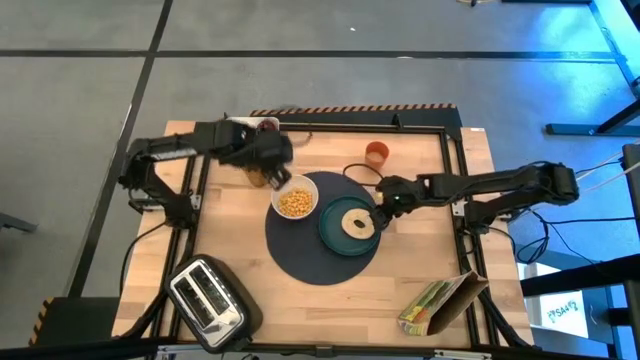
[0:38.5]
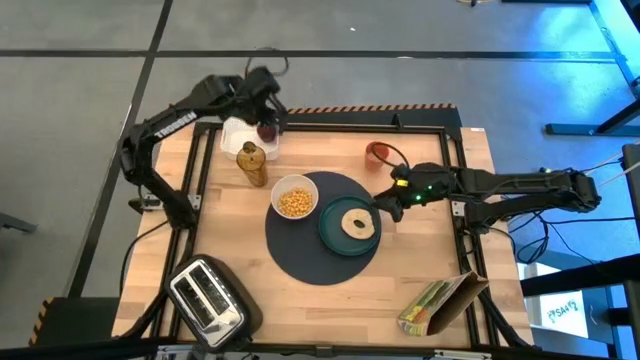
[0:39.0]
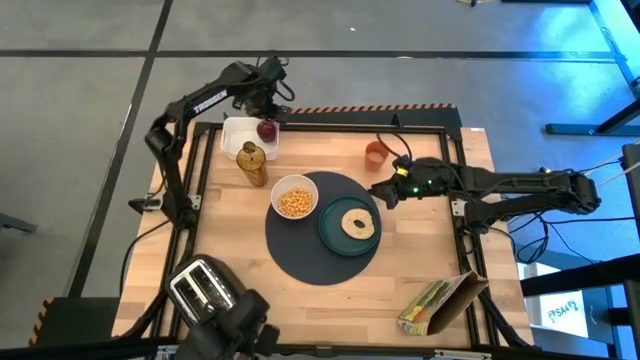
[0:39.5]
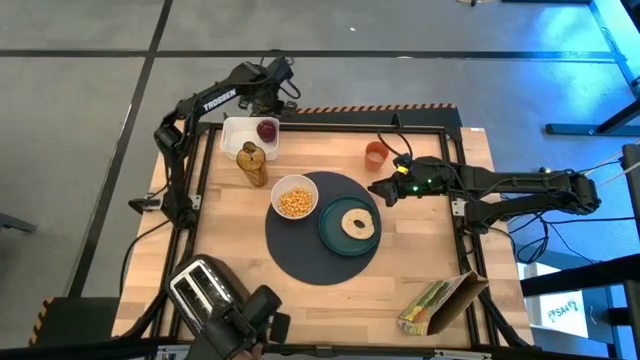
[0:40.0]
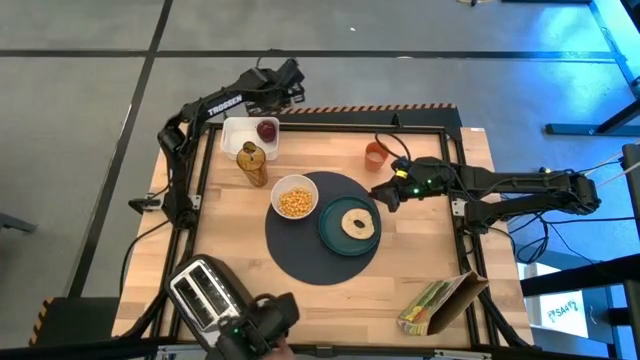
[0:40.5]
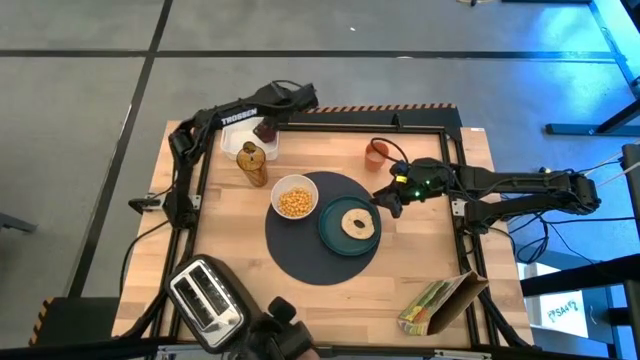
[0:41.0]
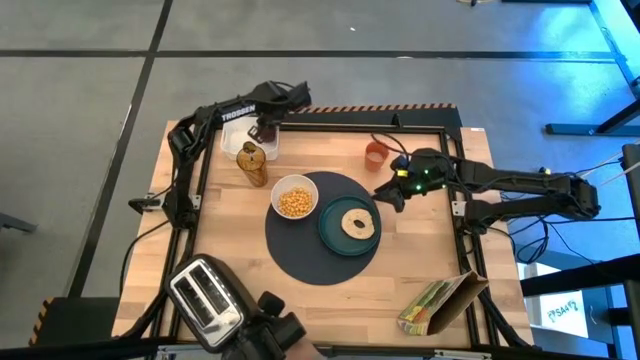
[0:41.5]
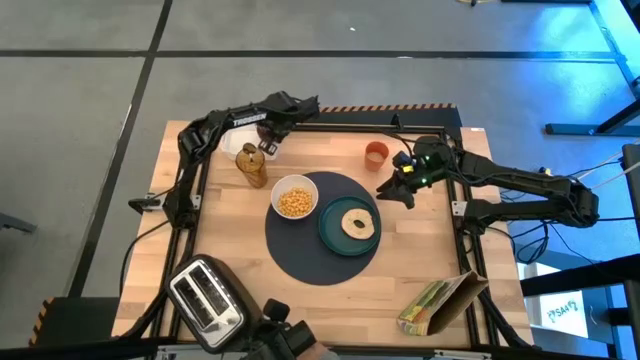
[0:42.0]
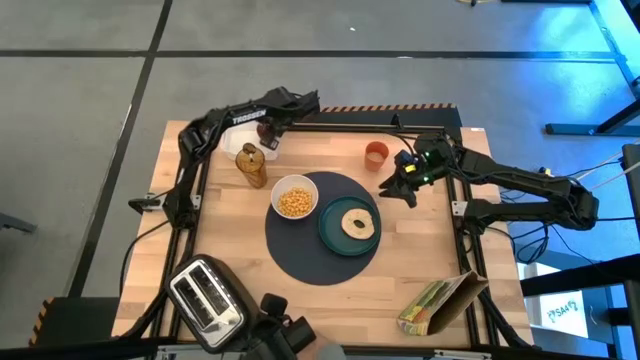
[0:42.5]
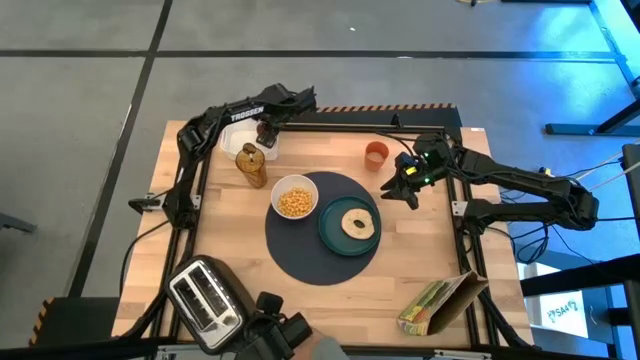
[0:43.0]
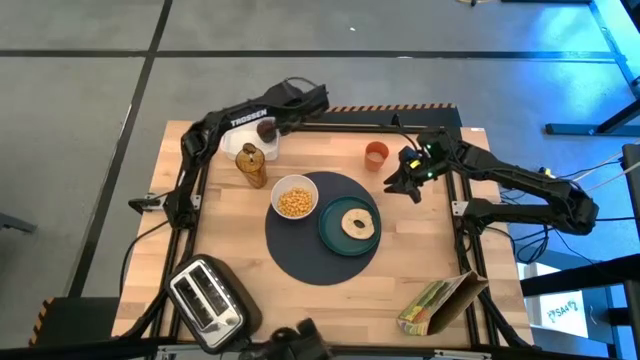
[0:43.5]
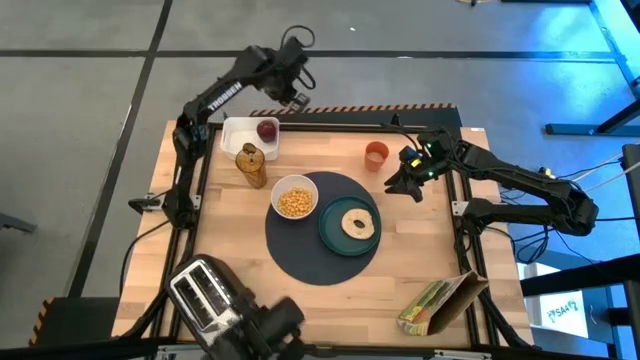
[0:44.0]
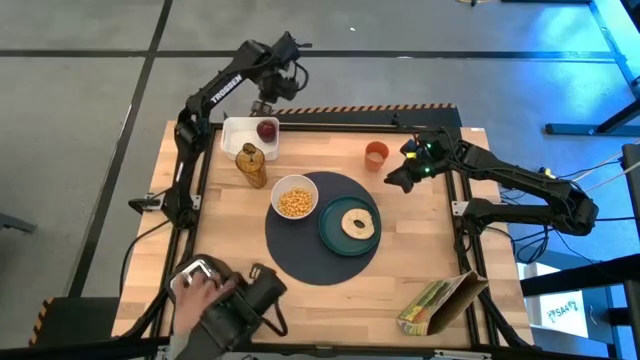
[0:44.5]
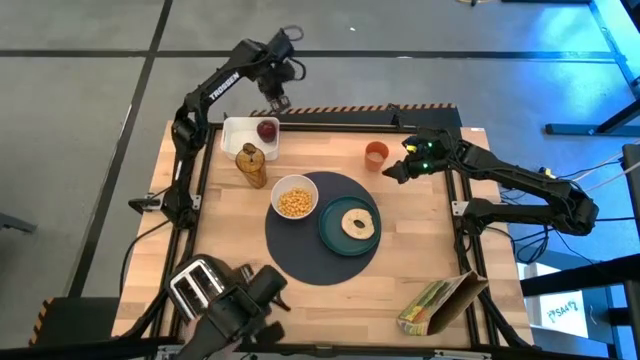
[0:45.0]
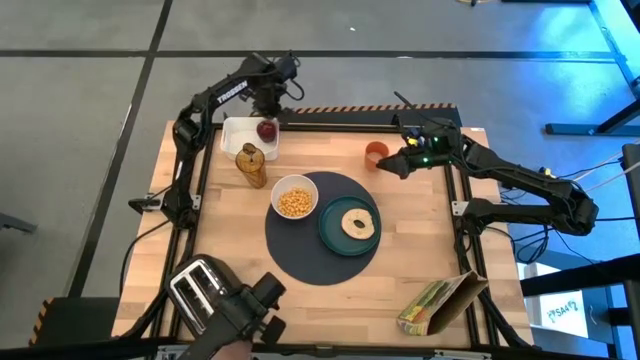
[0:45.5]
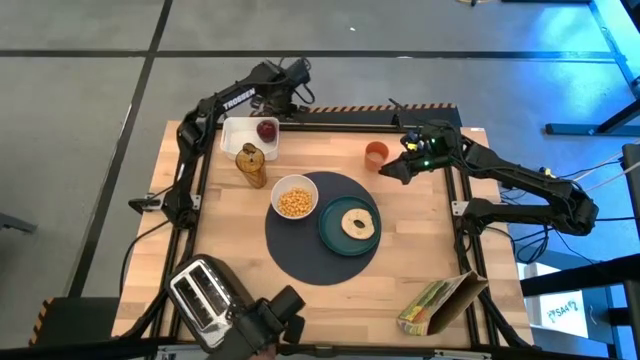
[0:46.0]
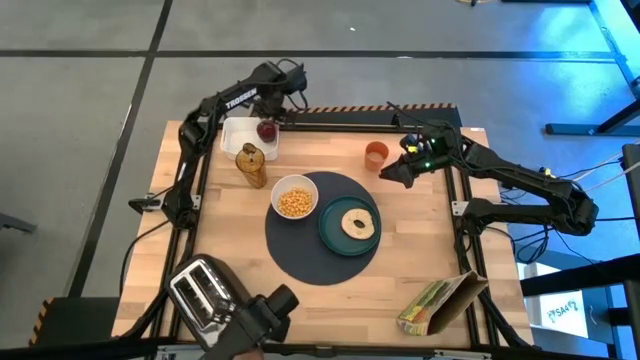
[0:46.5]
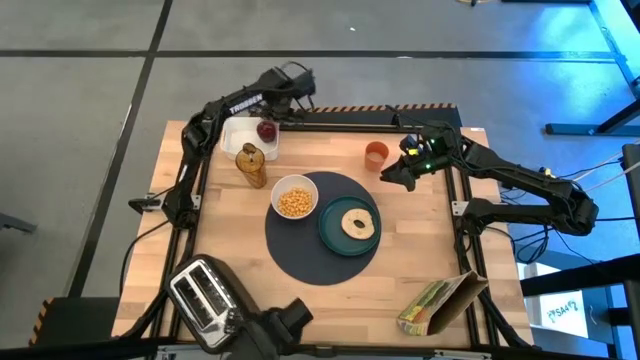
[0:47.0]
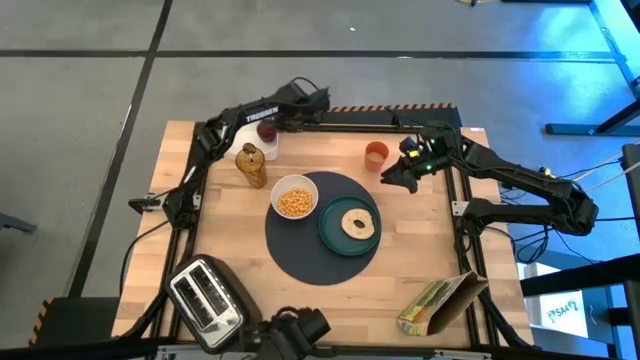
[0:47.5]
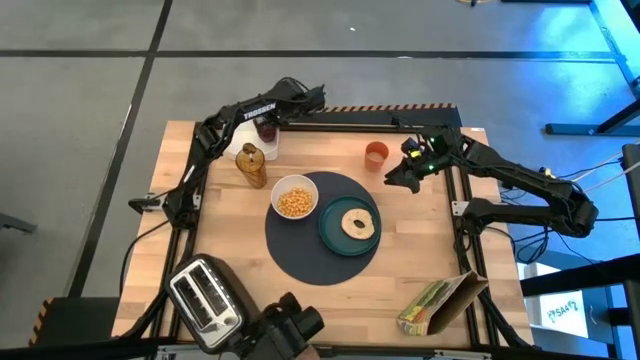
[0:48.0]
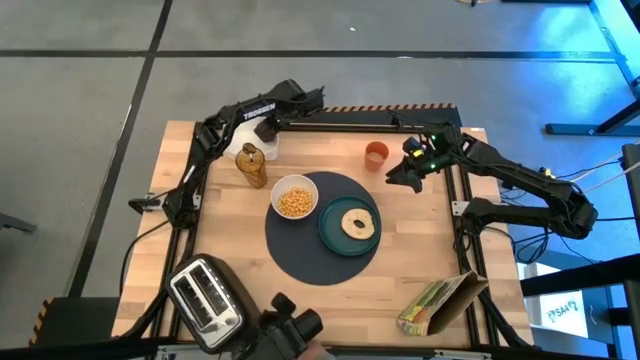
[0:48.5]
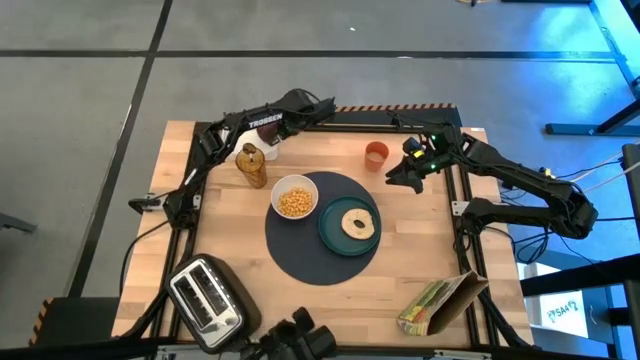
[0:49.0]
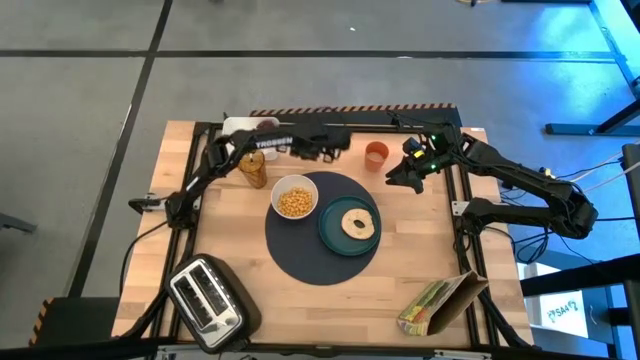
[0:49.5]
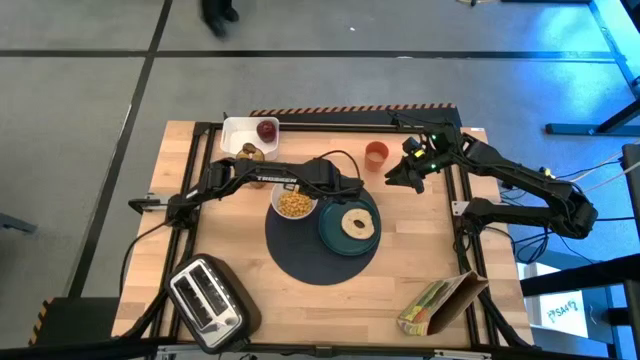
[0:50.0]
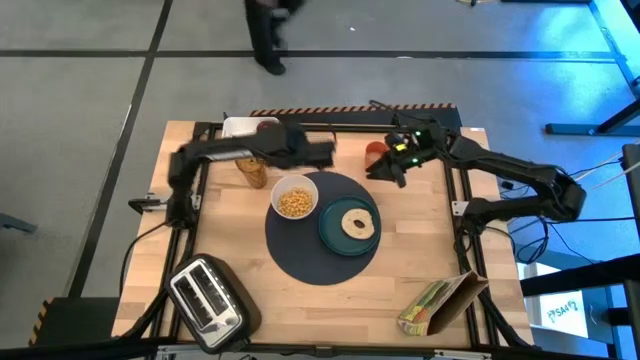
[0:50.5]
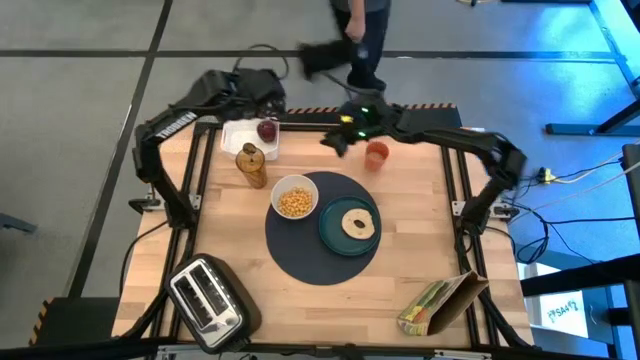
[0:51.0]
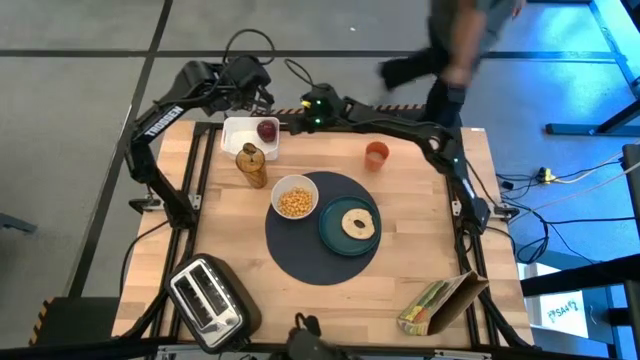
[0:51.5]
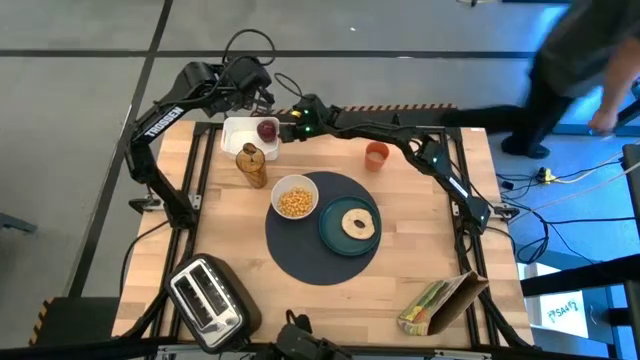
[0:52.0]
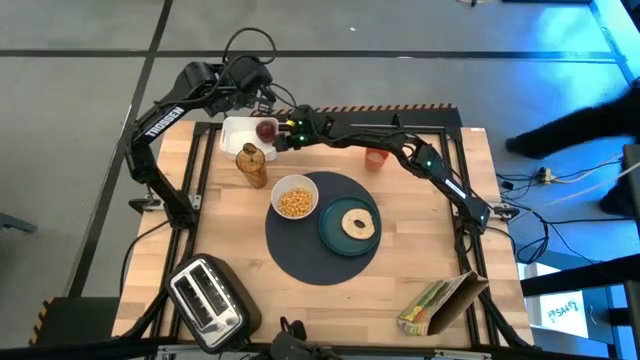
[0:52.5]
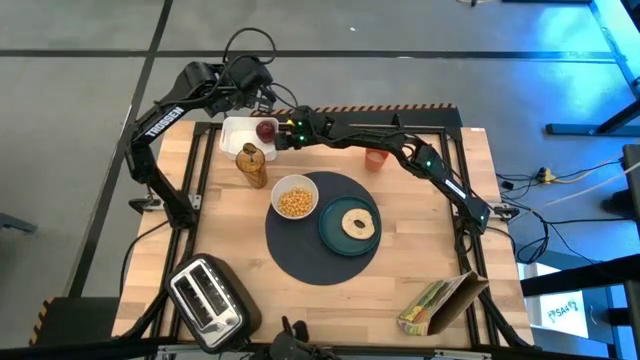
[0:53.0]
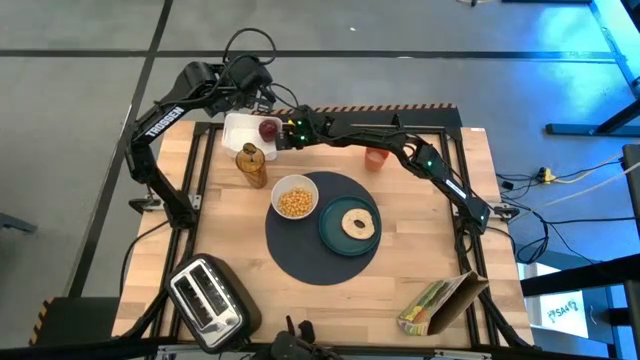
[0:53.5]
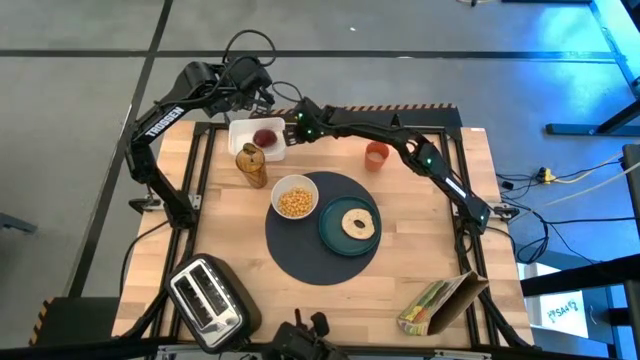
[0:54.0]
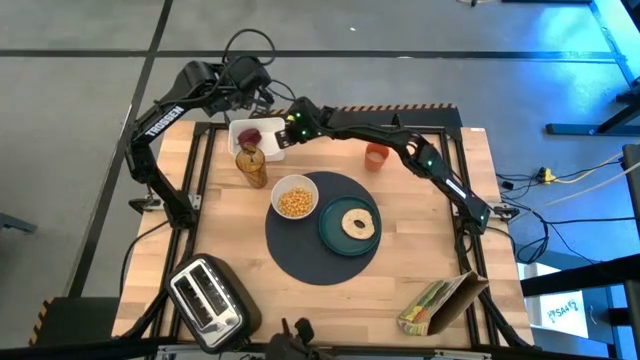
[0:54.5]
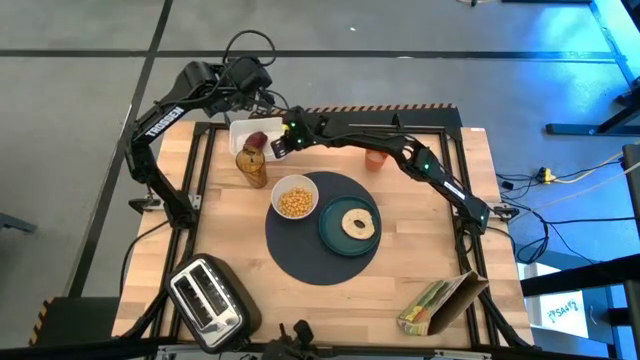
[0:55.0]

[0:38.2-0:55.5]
Task: Arrange a breakfast setting
Put the red apple on the green plate

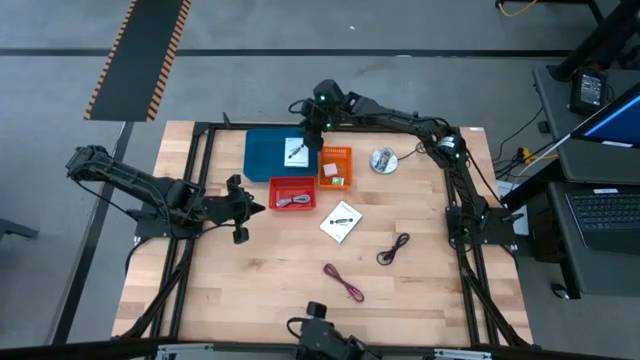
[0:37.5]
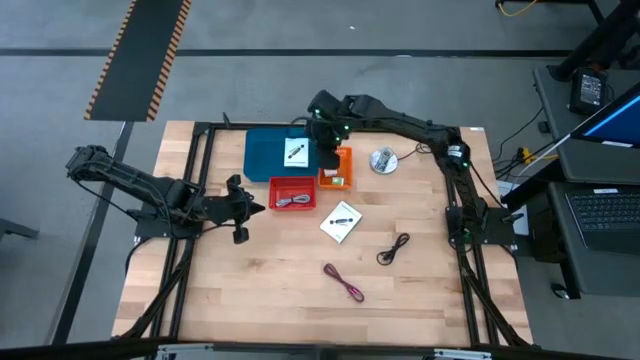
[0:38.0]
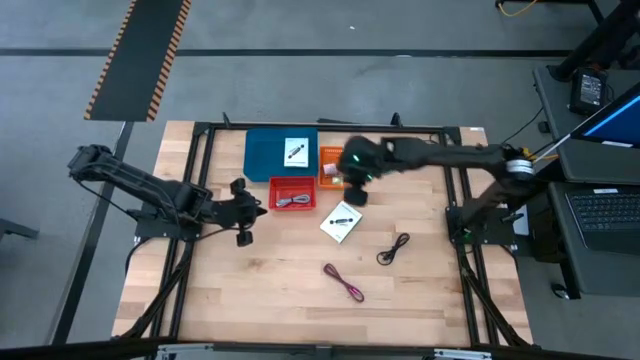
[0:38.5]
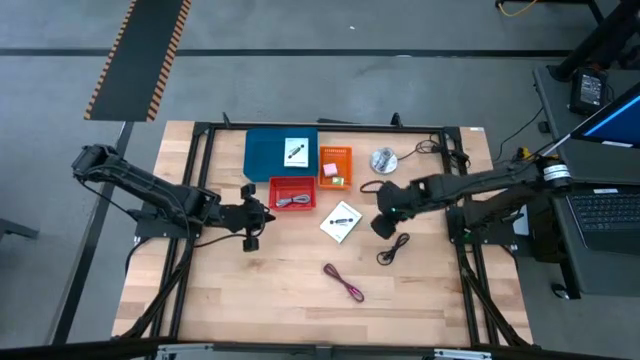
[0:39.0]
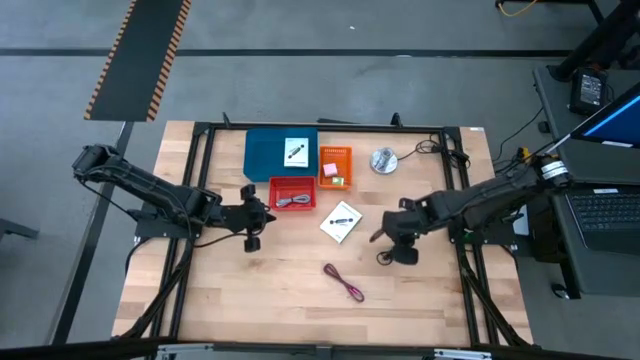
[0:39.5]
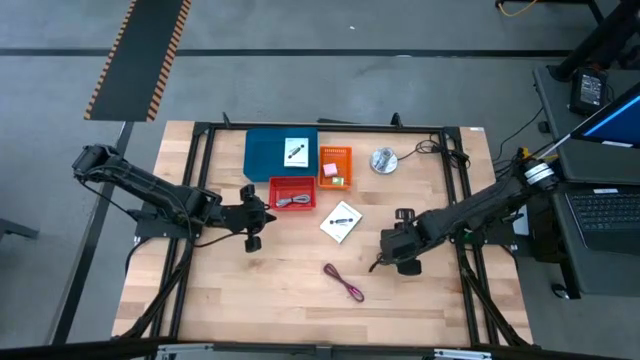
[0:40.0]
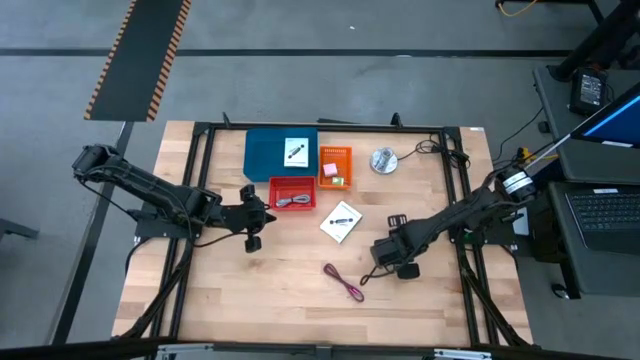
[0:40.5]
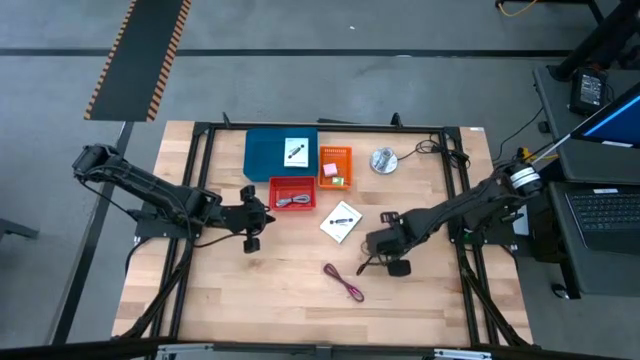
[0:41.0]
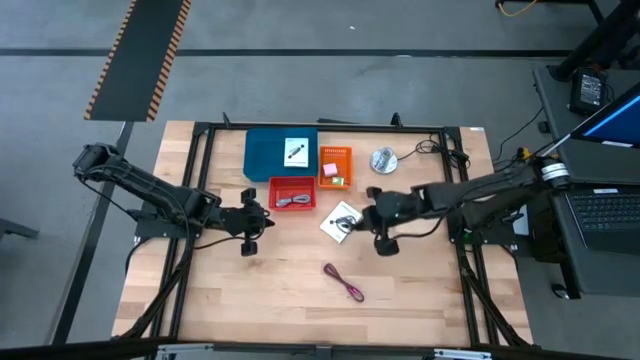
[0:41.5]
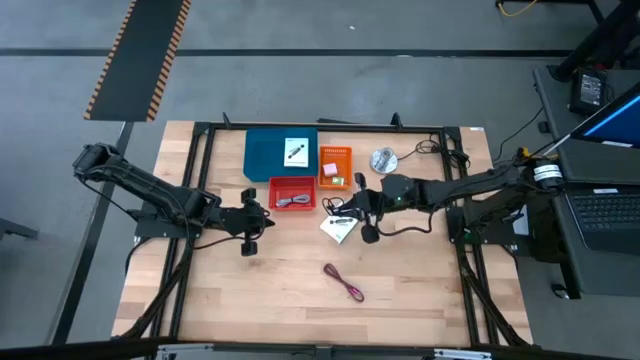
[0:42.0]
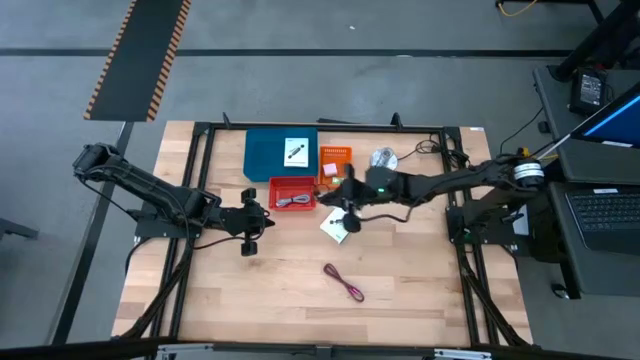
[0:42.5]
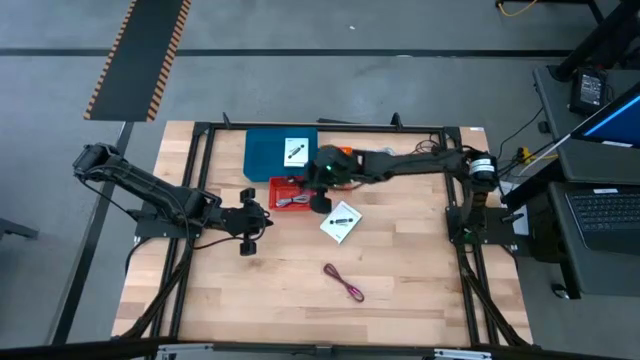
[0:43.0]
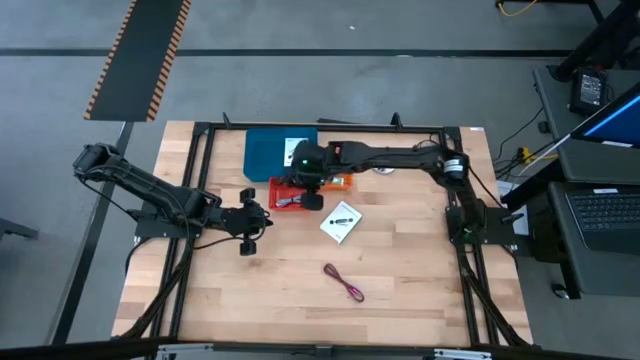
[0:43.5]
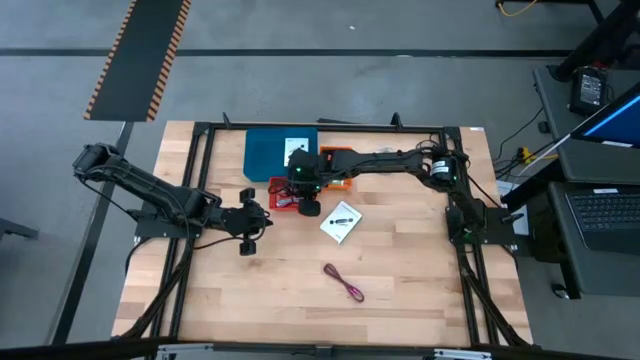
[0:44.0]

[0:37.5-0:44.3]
Task: Pick and place items into bin
Put the black charger cable into the red bin
